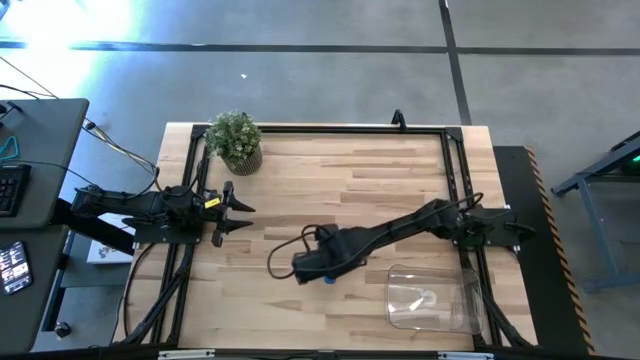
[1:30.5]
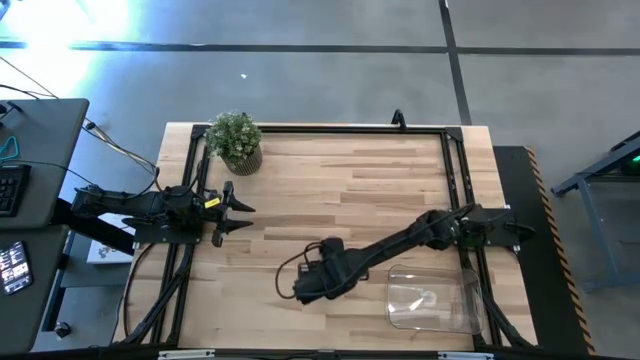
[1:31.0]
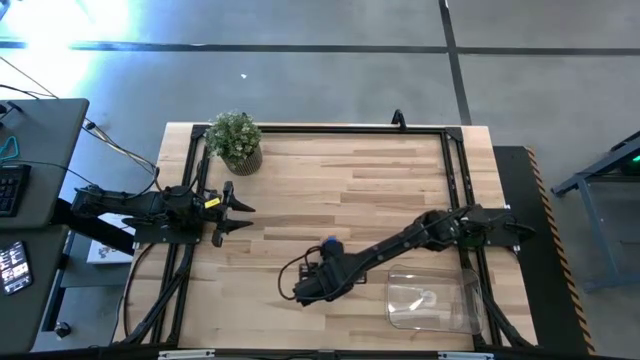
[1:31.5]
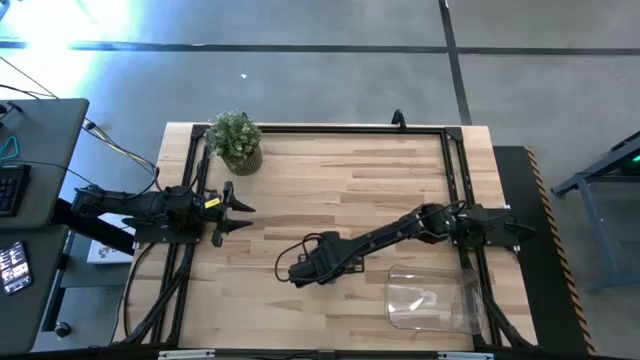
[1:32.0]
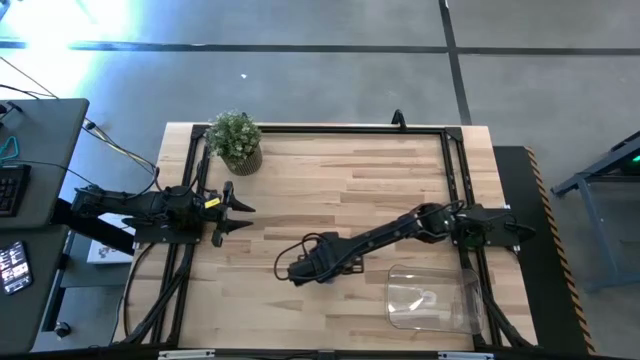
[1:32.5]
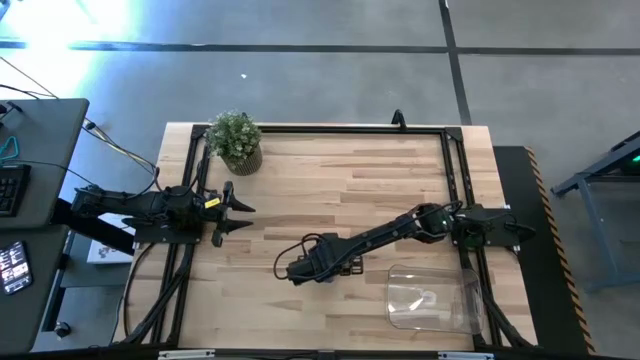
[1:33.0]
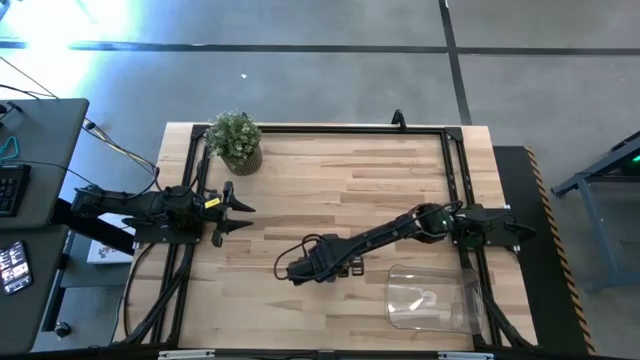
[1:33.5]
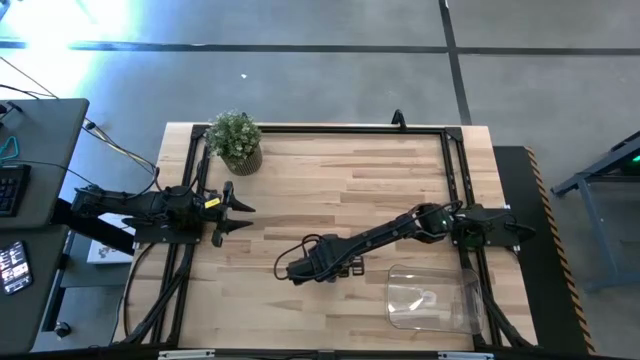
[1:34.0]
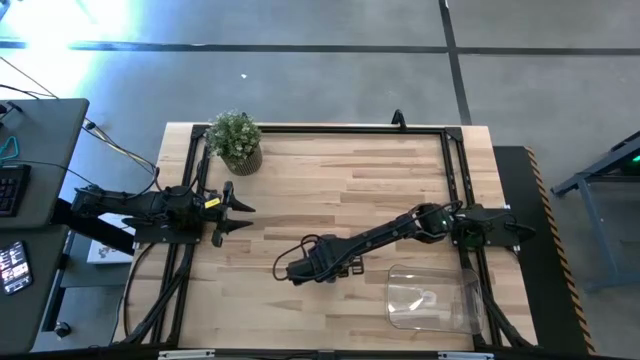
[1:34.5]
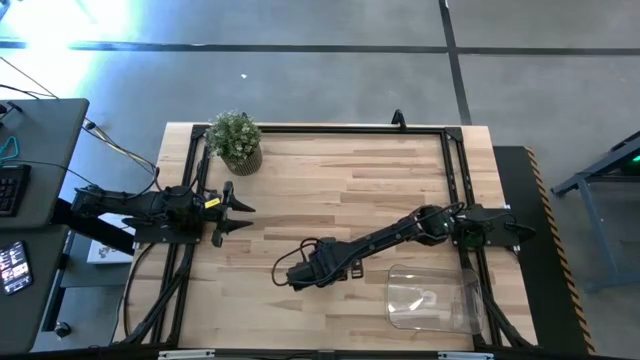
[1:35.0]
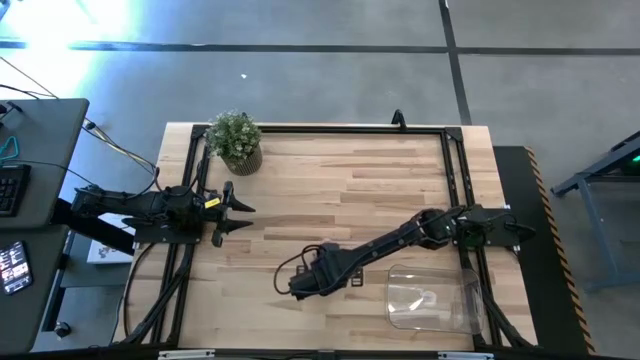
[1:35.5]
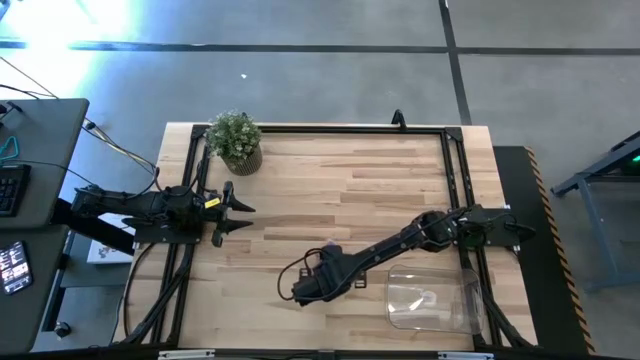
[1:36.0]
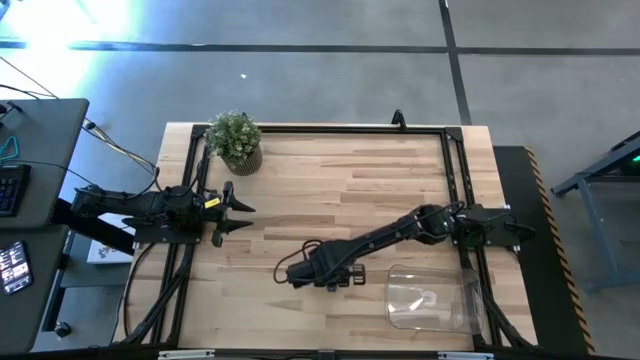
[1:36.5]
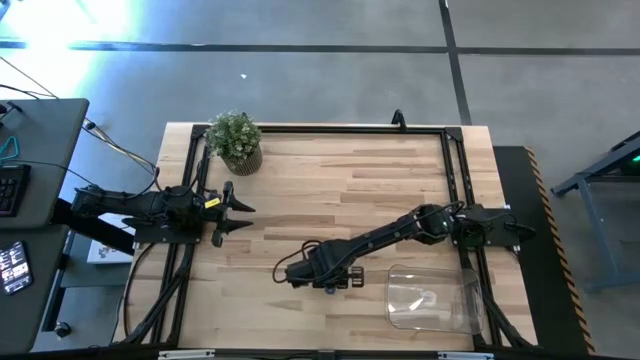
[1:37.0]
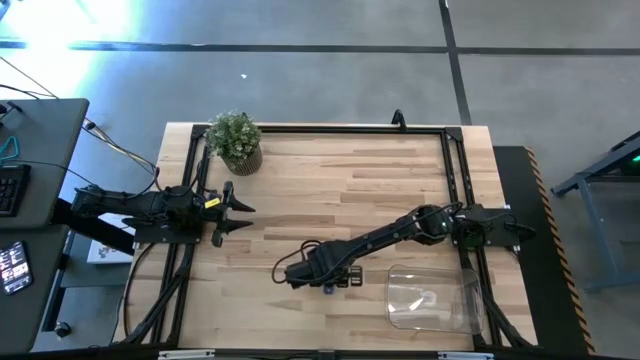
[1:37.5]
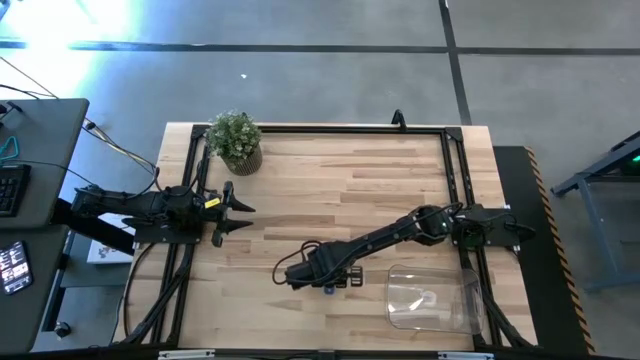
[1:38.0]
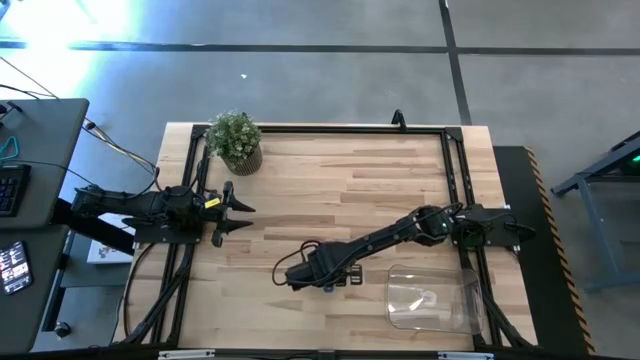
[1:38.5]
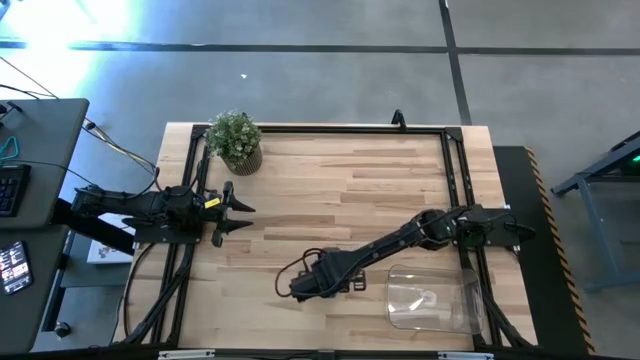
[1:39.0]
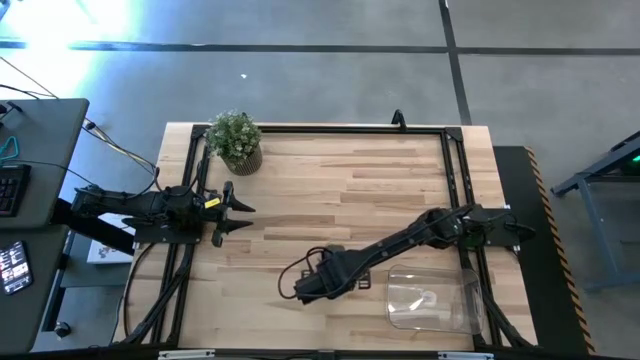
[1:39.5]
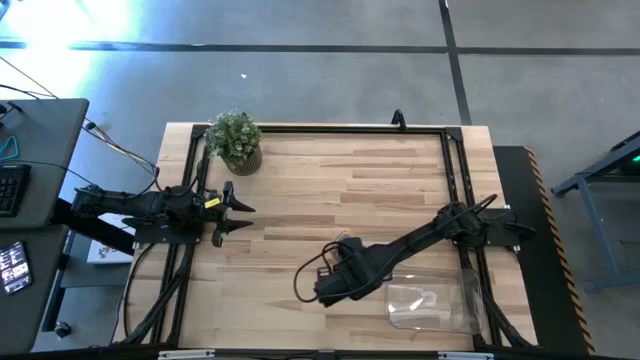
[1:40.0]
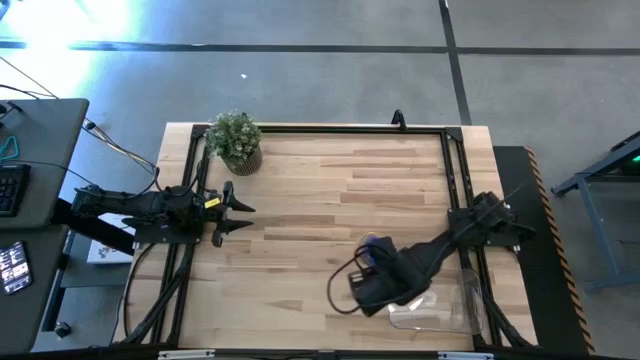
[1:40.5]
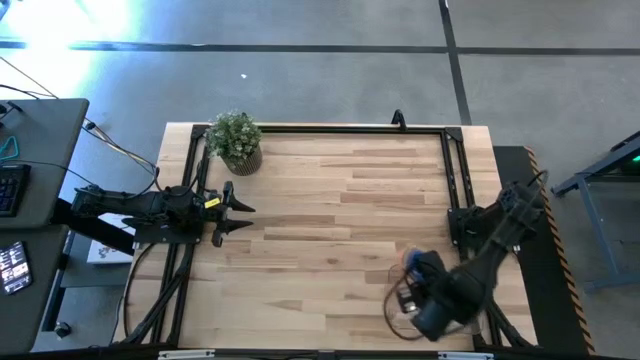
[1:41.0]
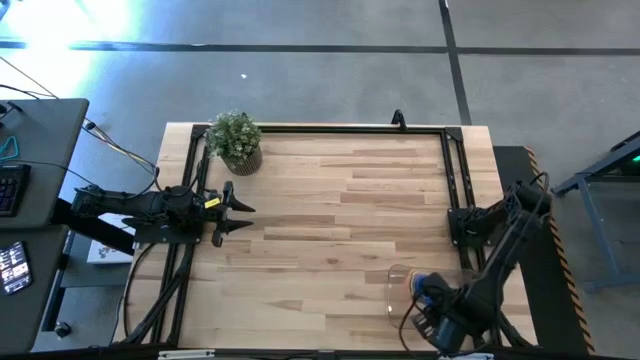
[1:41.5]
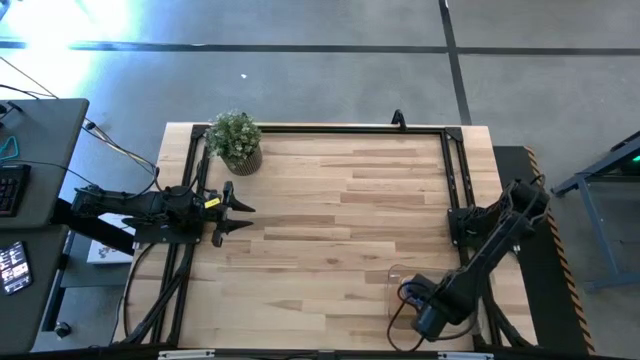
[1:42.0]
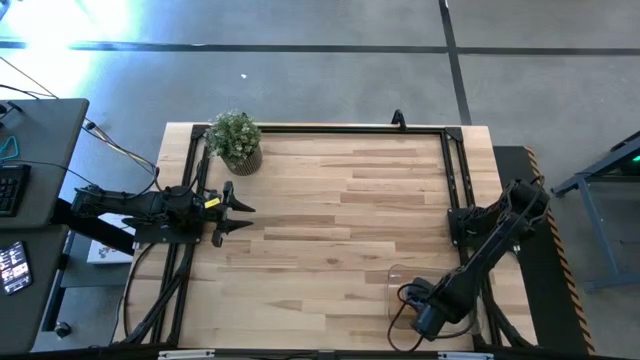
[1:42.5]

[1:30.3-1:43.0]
Task: Nest measuring cups in basket
Put the nested measuring cups into the transparent bin

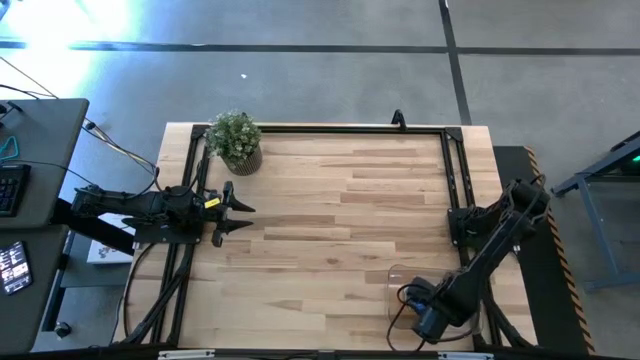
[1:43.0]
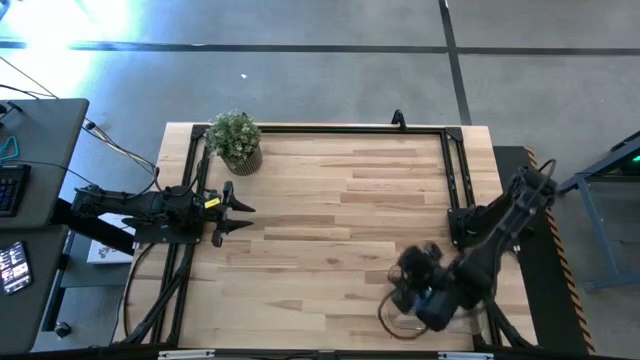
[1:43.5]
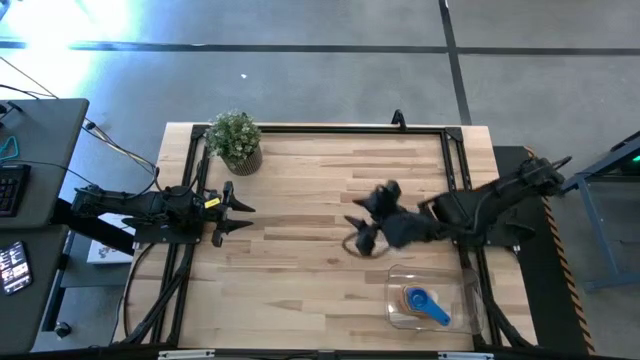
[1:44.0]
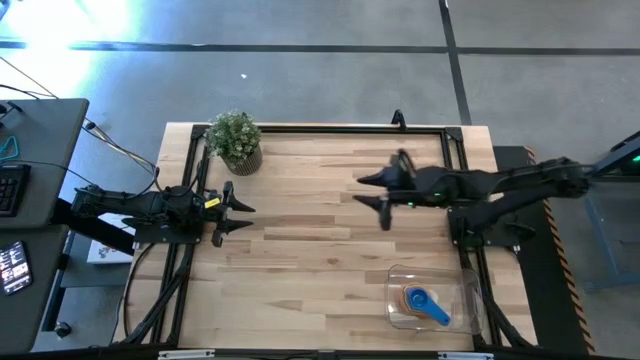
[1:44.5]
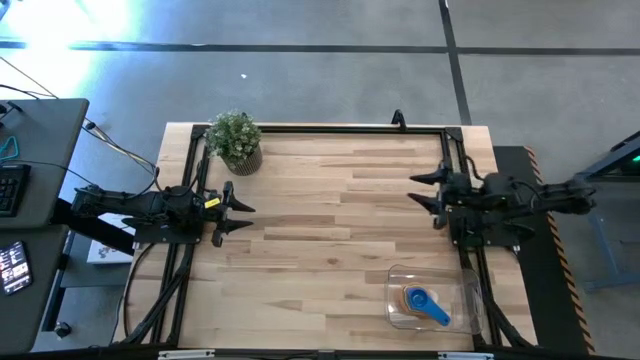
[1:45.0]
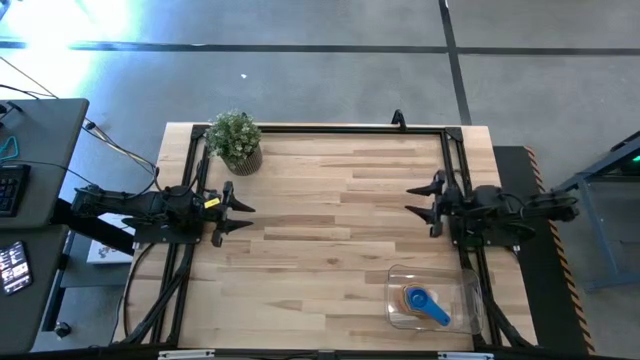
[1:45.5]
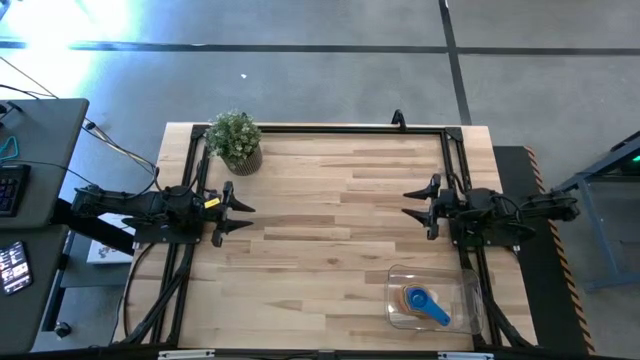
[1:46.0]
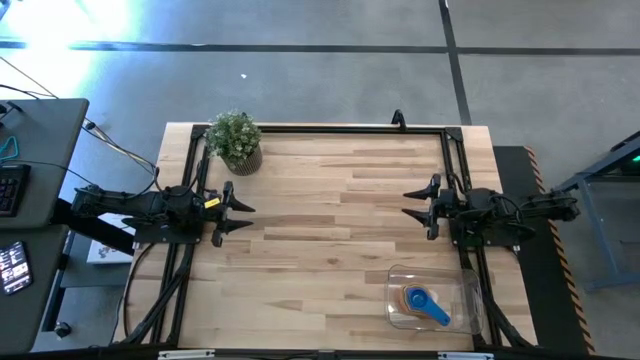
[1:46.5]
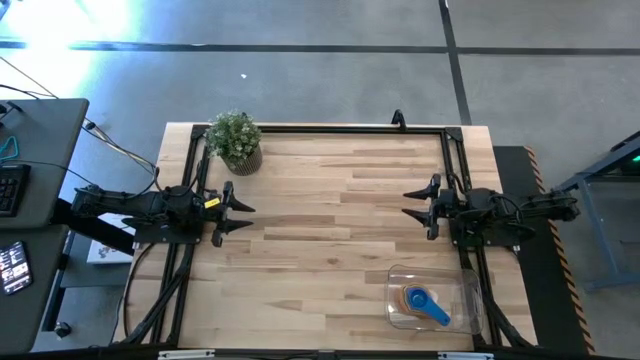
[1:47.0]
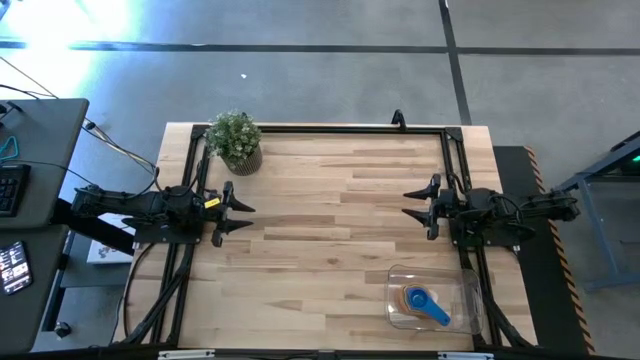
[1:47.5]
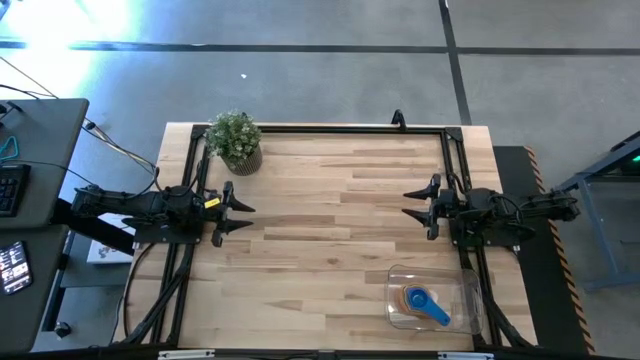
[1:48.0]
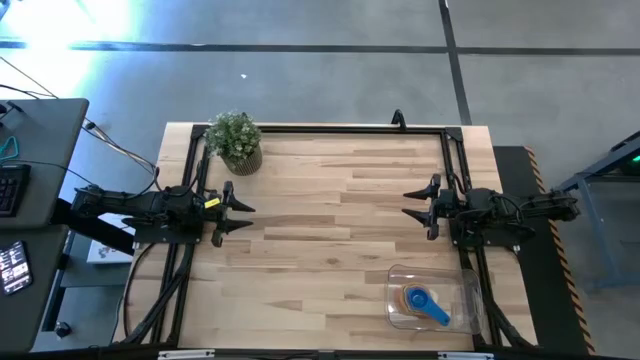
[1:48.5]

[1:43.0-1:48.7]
Return to Home Position

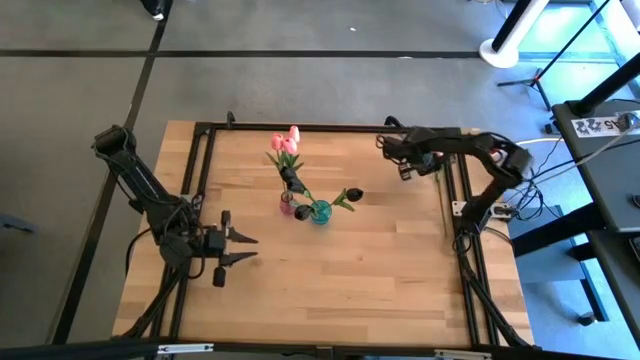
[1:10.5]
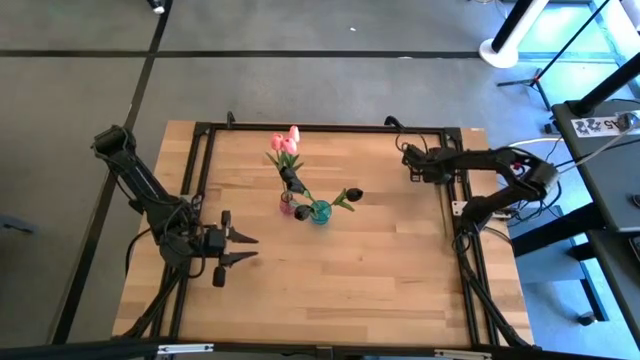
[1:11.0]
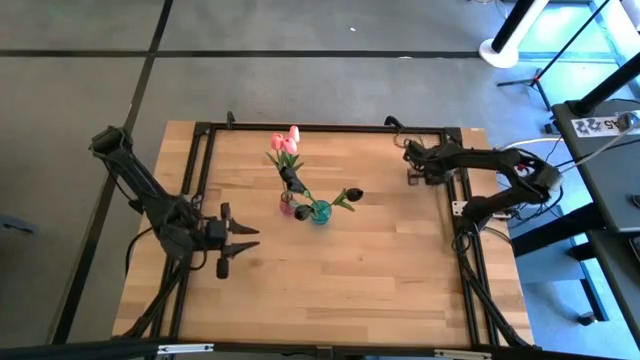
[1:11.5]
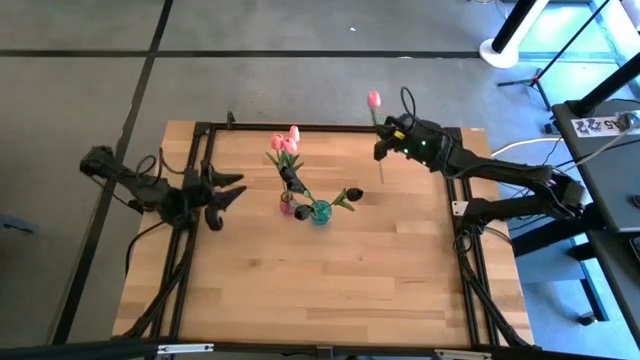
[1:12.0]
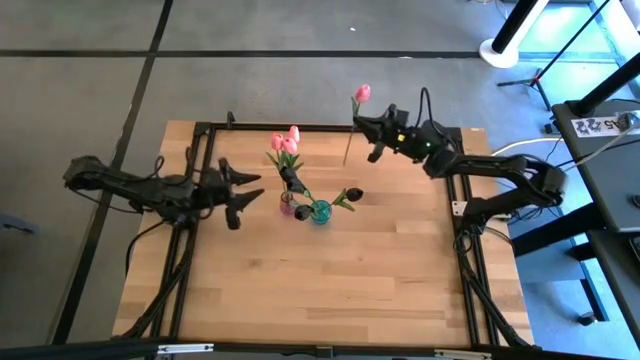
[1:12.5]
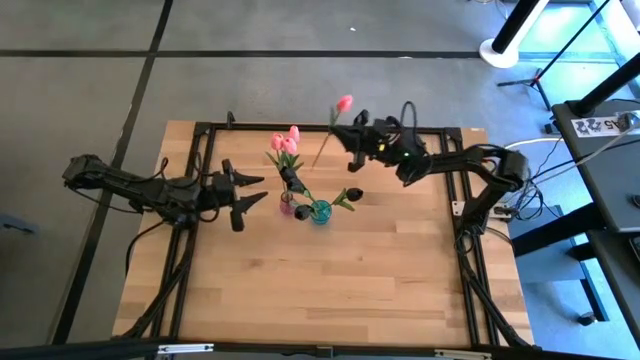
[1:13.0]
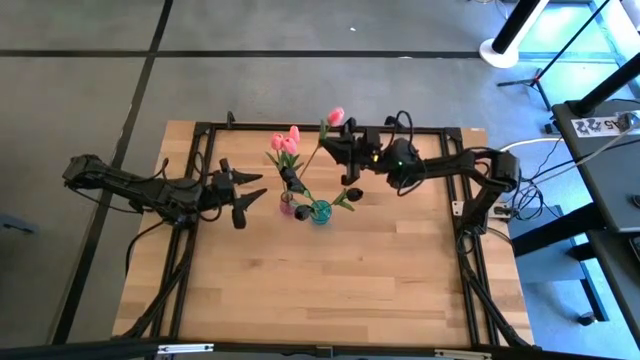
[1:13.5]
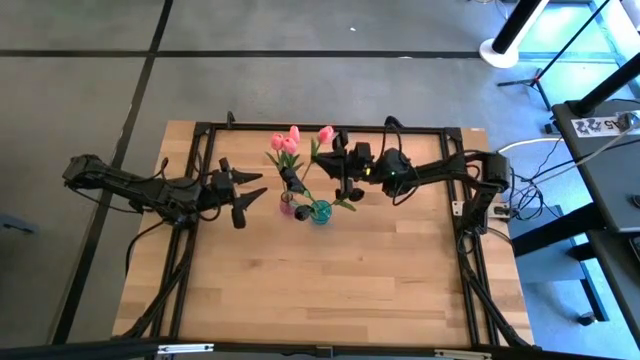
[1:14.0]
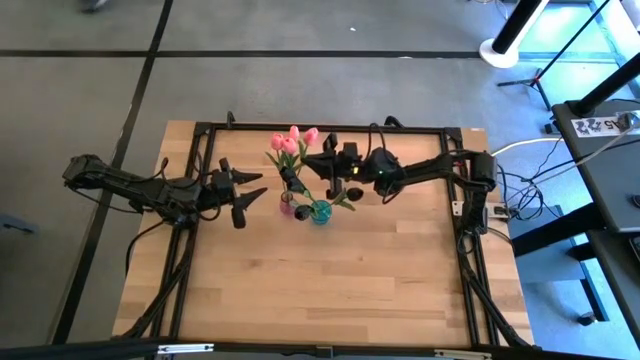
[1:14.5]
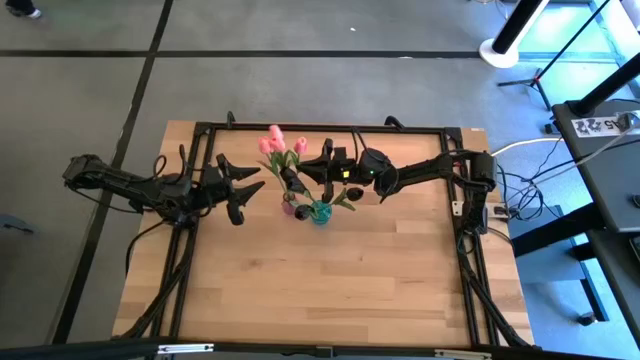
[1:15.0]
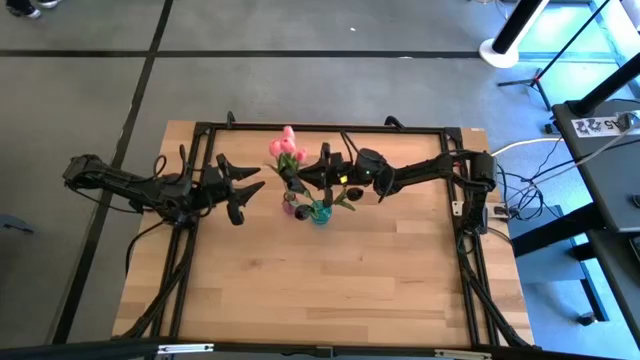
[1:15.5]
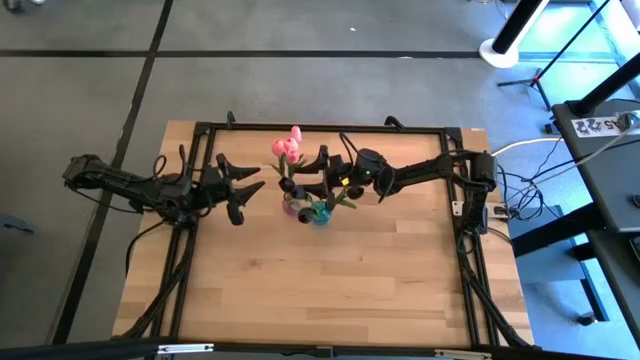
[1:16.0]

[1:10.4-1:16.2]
Task: Sort flowers into vase by color
Put the pink tulip into the pink vase
